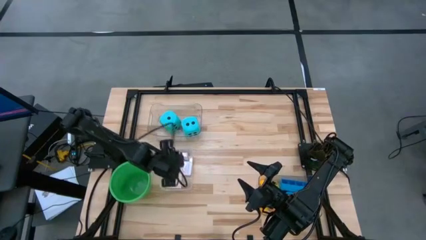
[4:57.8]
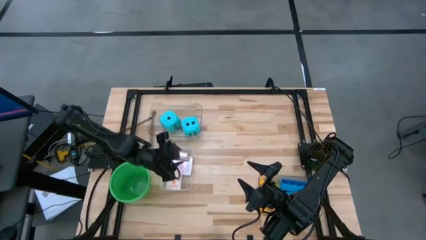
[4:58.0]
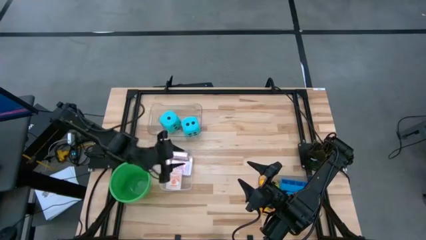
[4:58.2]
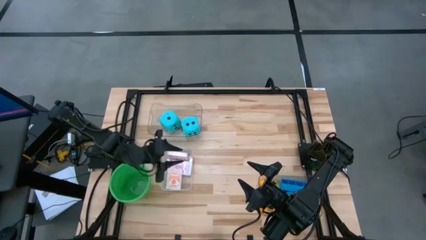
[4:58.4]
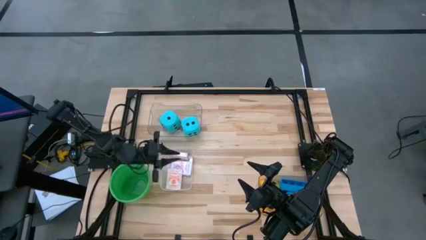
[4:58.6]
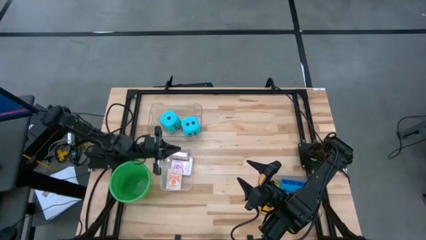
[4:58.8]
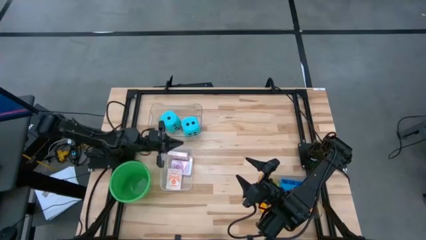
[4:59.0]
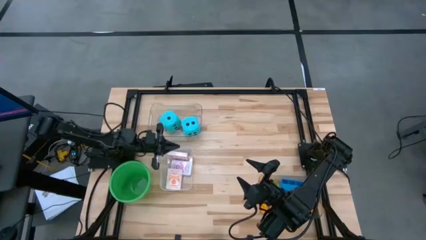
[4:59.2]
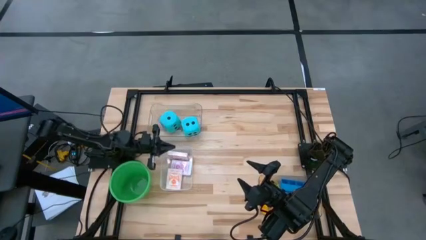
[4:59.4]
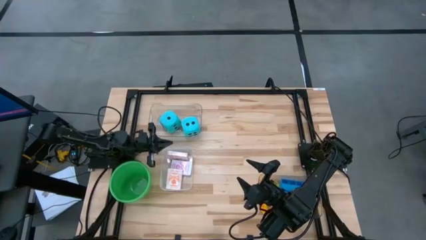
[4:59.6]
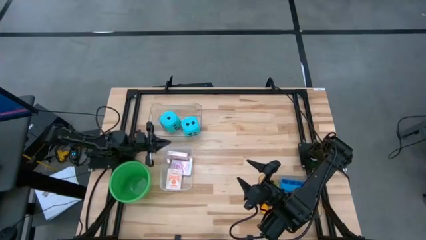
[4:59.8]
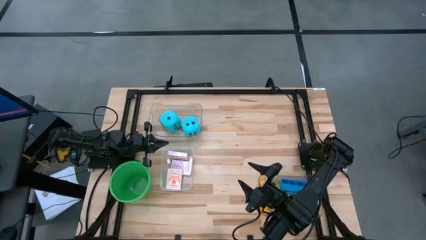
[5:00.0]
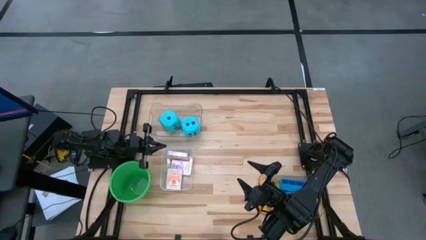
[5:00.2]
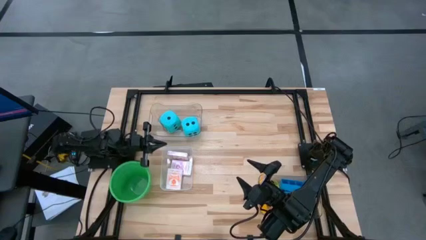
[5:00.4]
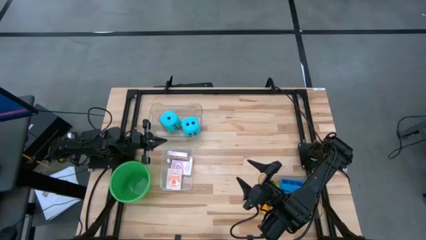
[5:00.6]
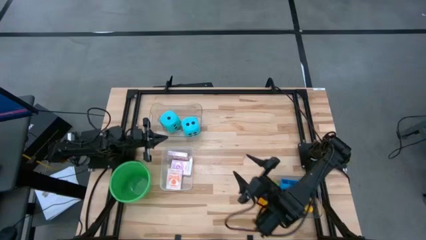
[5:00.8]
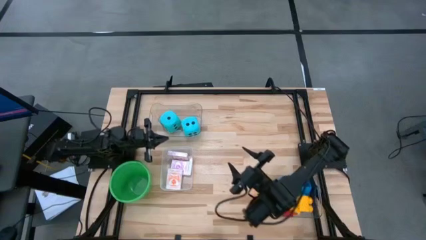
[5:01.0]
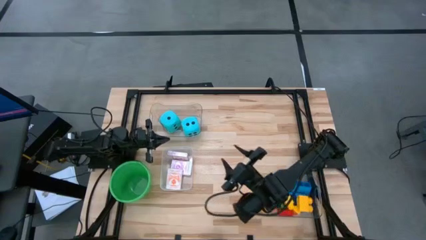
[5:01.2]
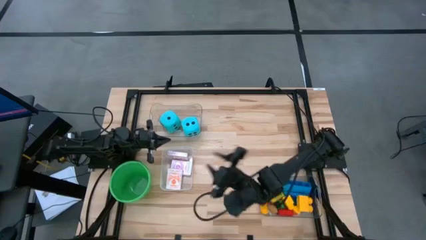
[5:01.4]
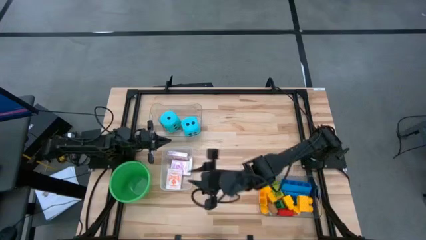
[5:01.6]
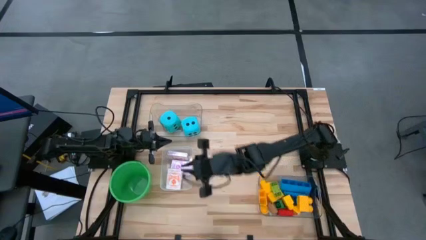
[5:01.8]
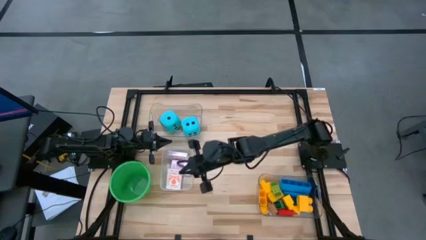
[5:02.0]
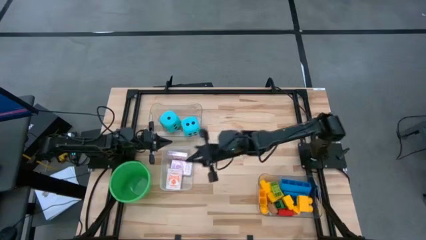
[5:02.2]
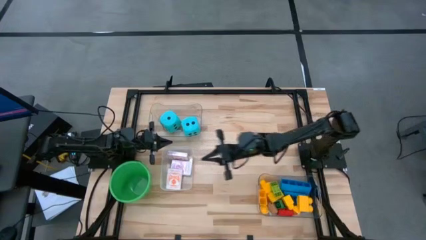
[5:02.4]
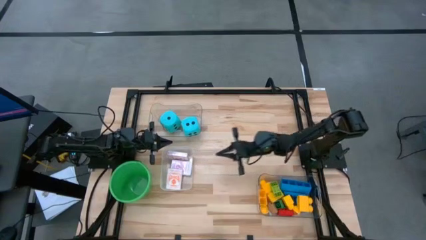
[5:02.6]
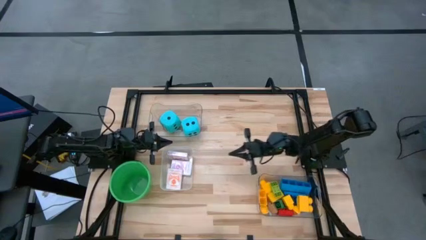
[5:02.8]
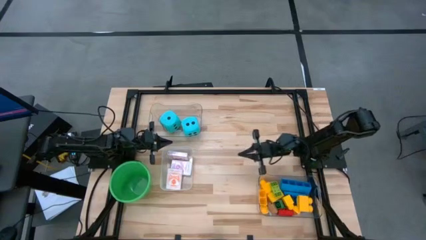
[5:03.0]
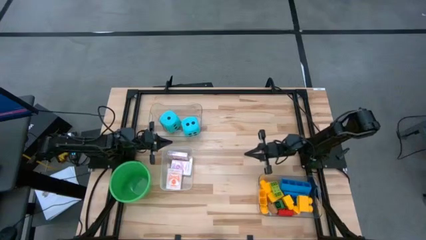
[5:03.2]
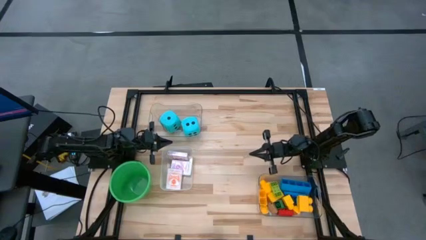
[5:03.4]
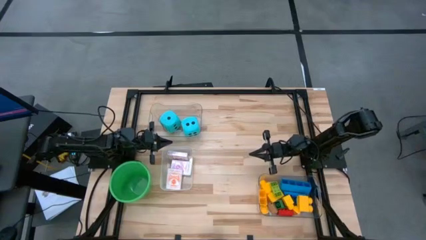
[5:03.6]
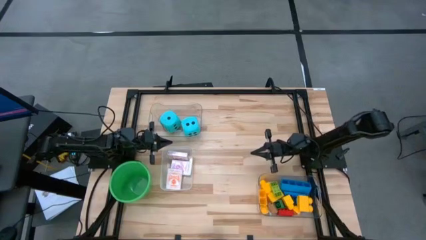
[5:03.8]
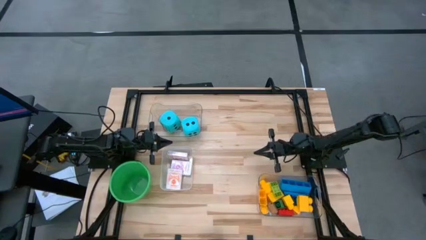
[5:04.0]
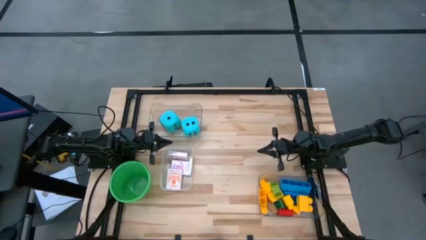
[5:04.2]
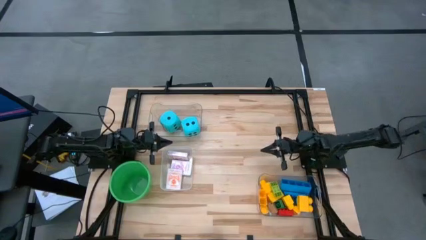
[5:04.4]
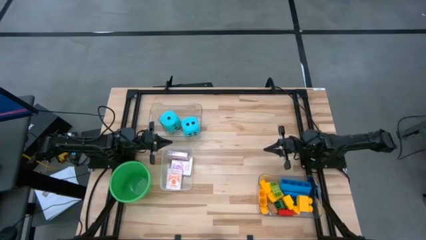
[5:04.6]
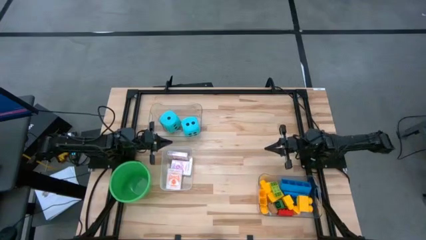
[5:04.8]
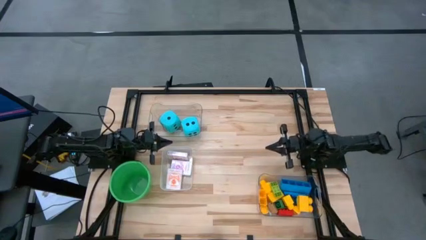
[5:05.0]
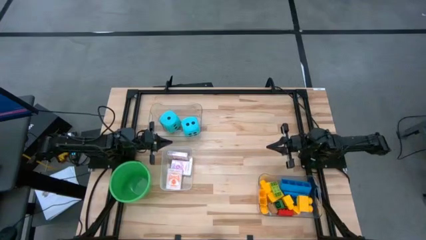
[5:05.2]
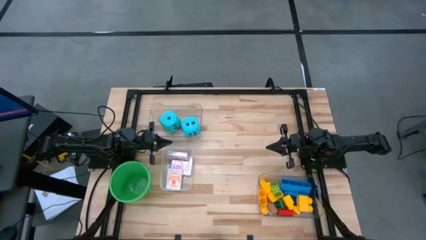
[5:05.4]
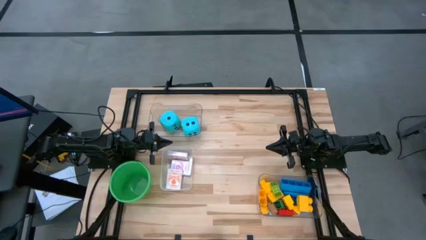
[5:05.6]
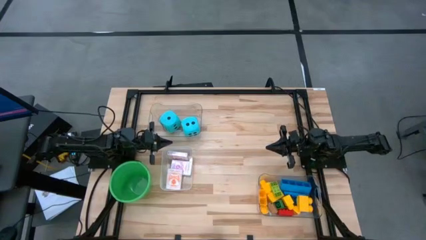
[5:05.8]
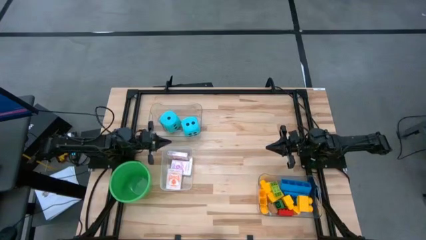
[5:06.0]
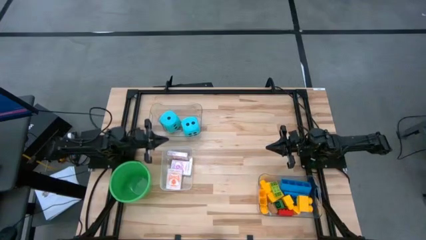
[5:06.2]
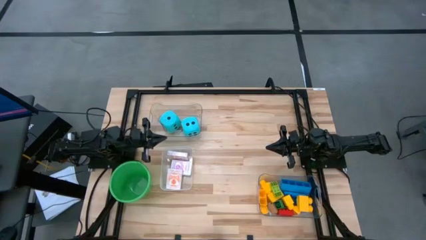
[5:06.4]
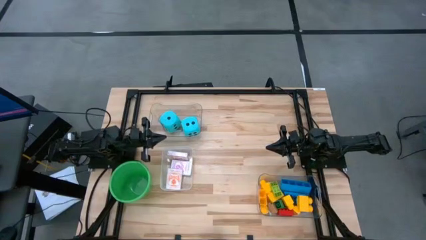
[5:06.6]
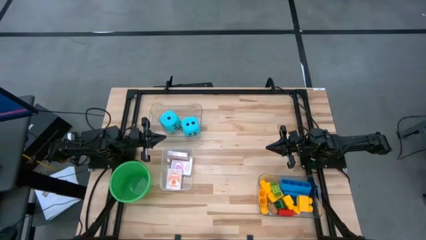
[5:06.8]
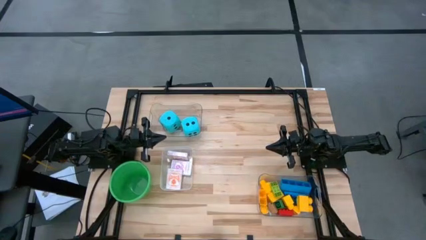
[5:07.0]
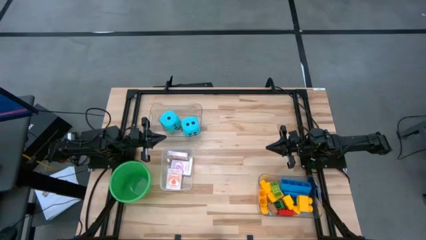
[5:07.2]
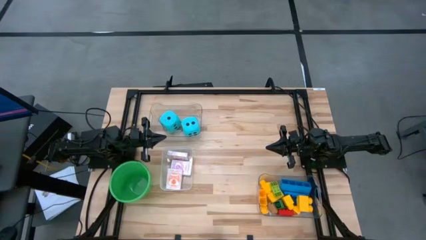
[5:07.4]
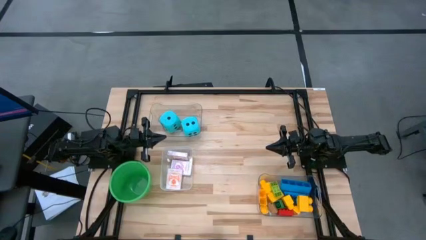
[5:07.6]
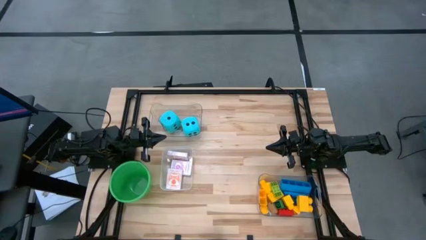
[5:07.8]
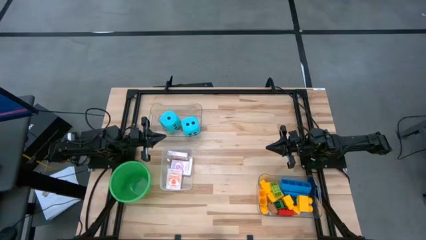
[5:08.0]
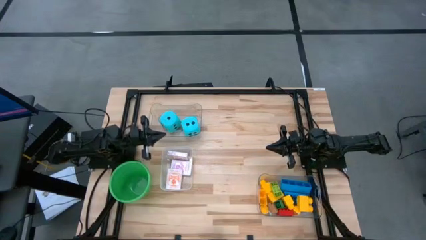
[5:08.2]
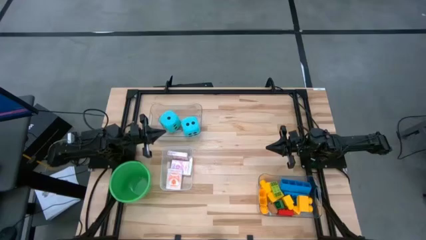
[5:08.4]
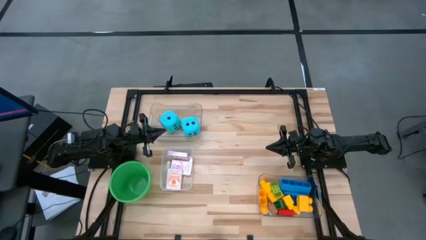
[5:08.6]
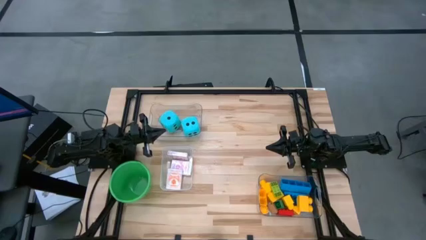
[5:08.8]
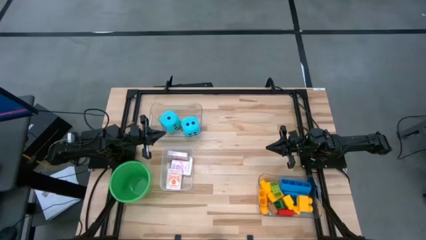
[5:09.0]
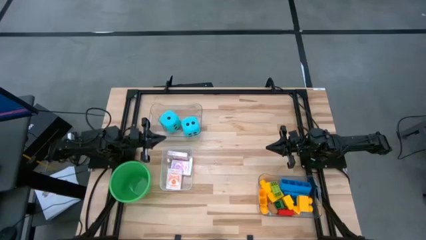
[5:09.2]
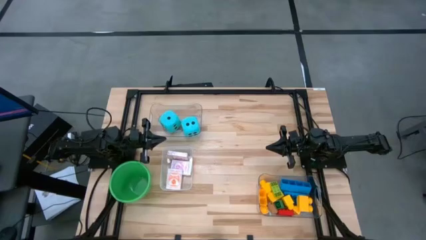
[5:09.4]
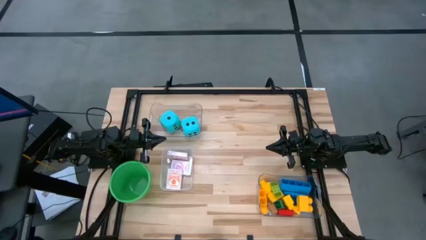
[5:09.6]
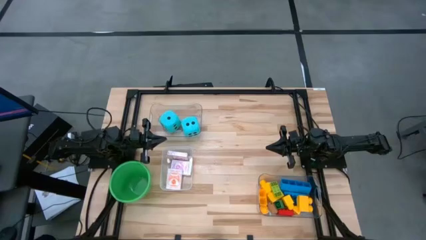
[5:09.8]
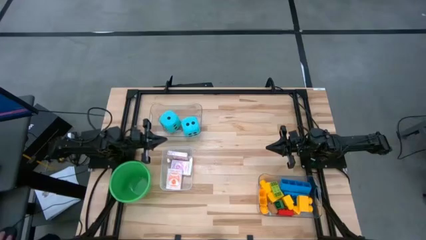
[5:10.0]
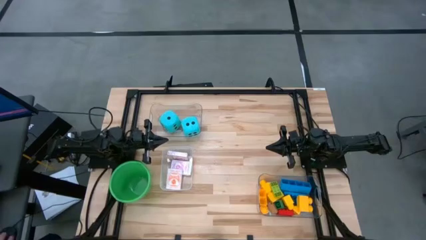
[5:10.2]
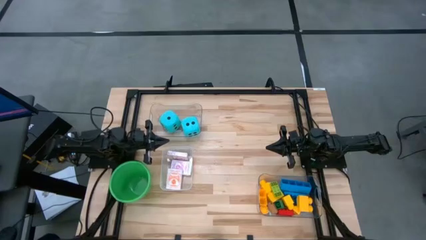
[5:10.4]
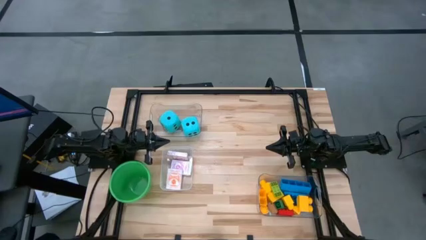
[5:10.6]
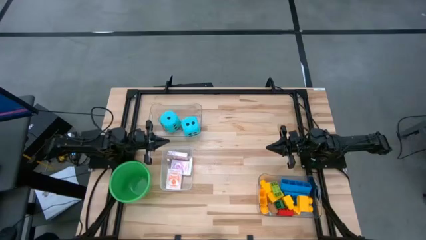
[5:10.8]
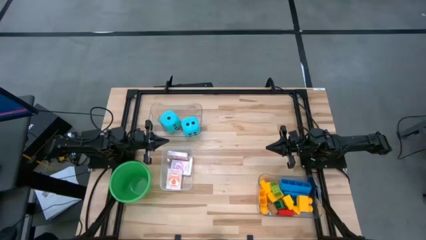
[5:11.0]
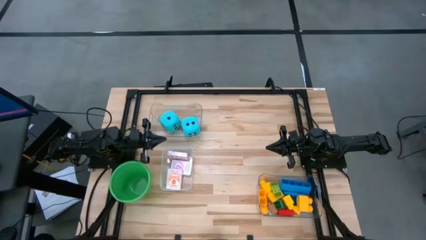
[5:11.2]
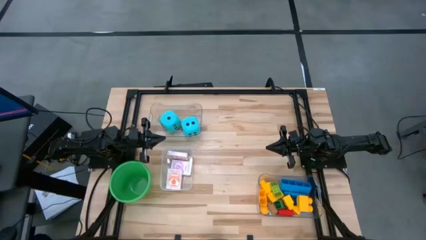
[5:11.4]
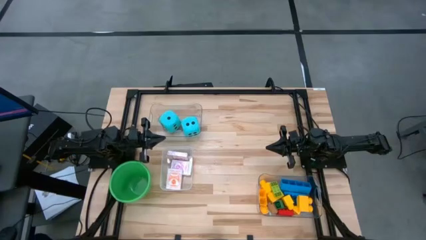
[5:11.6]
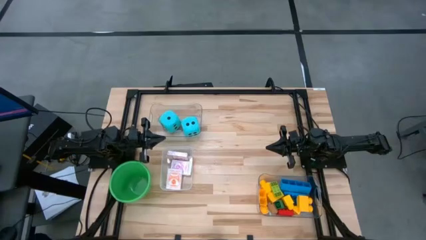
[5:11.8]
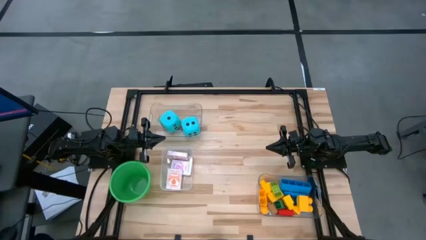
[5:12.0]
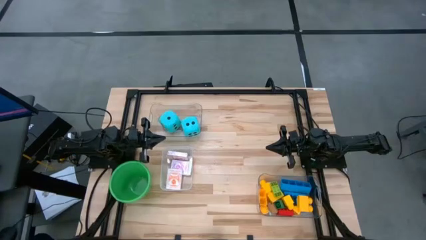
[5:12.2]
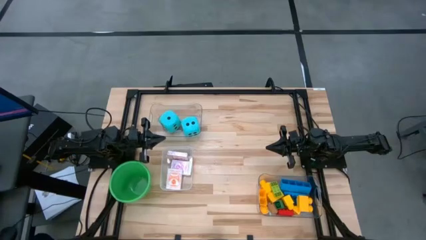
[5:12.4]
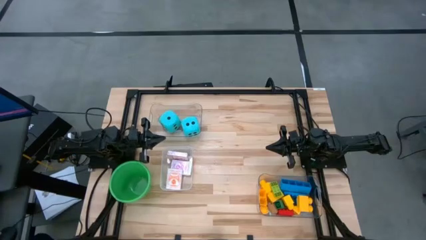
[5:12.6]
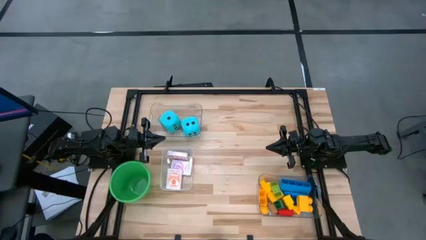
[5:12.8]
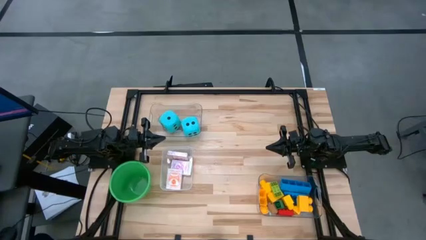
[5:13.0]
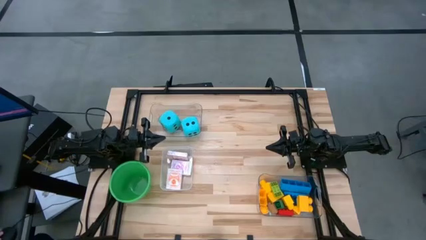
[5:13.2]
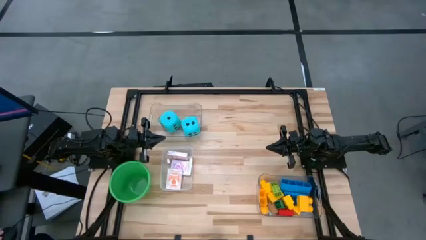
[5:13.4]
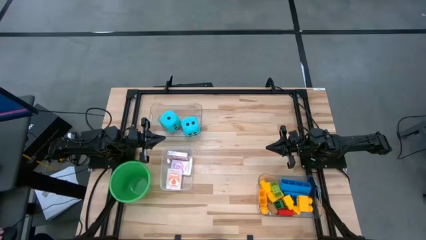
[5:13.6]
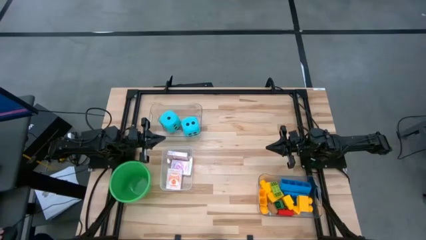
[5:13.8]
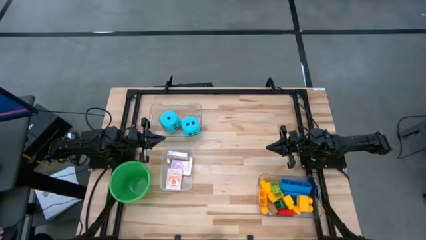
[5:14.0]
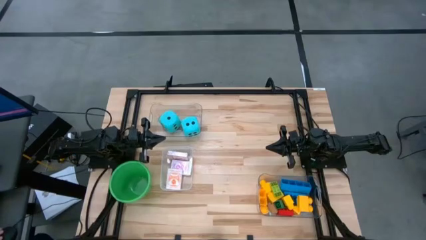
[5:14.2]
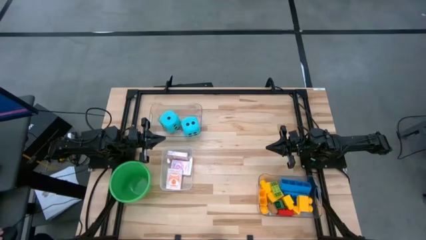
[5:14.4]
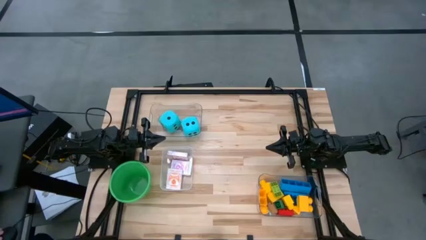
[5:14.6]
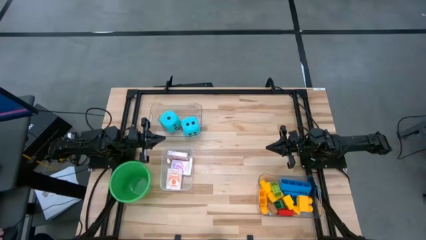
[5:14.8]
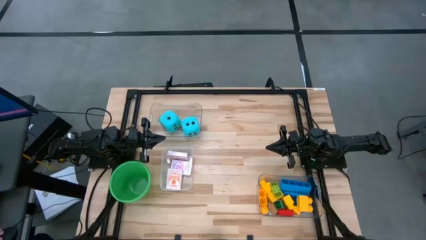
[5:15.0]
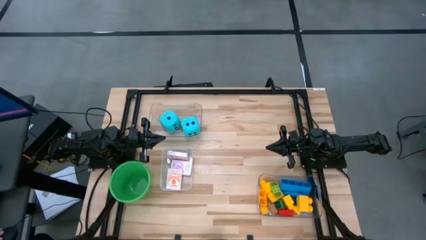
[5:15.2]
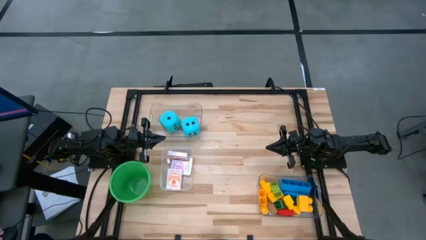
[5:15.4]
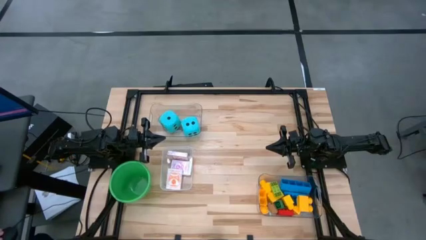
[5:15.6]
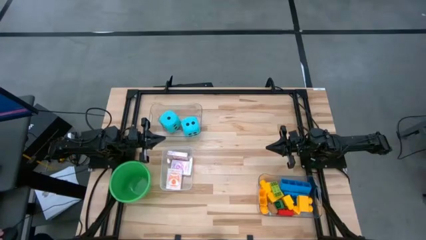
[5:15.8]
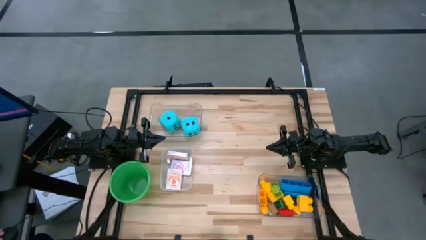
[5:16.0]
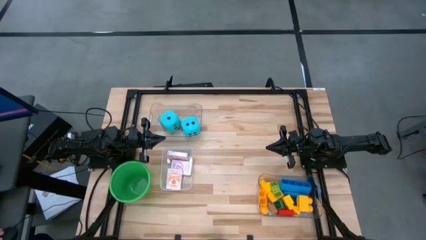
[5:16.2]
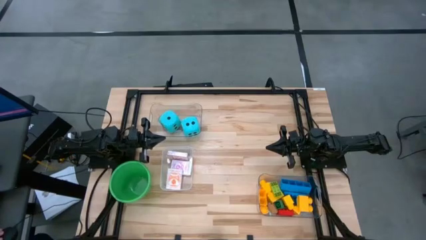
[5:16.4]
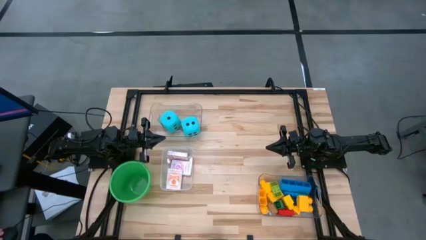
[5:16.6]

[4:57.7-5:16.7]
Task: Pick & Place Toys
Return to Home Position
